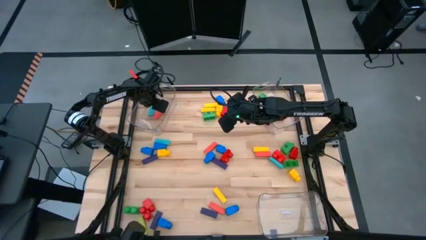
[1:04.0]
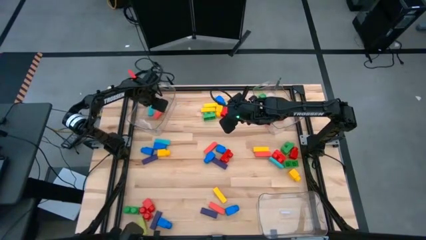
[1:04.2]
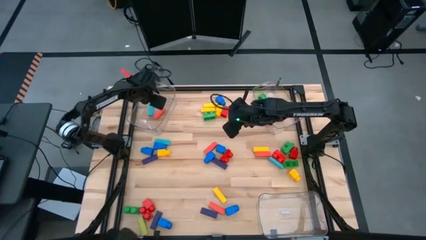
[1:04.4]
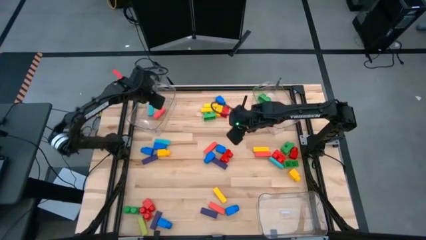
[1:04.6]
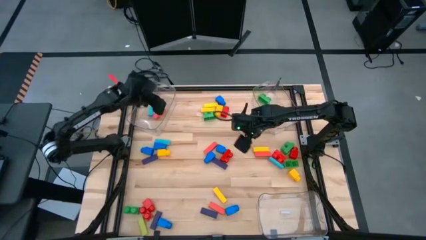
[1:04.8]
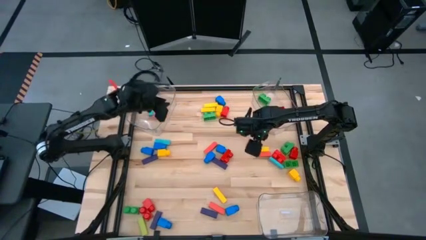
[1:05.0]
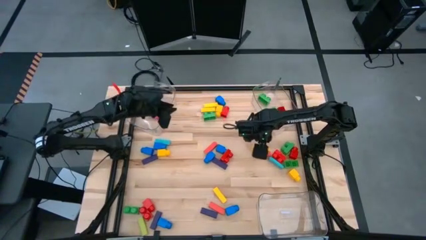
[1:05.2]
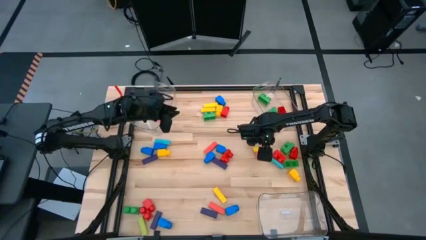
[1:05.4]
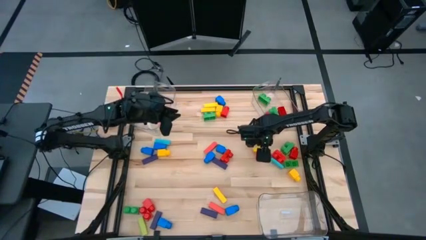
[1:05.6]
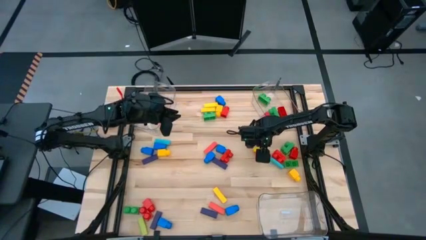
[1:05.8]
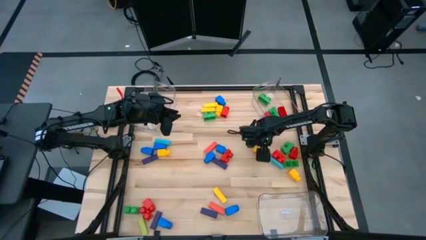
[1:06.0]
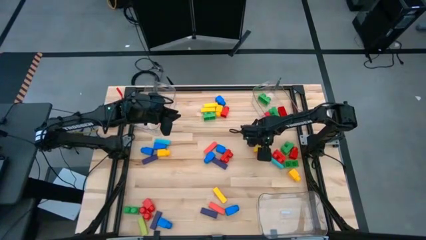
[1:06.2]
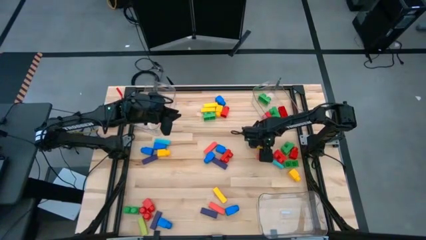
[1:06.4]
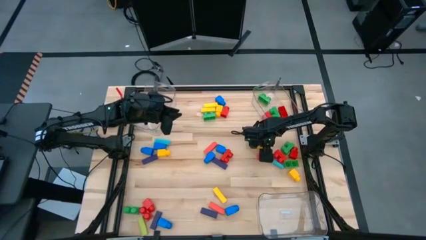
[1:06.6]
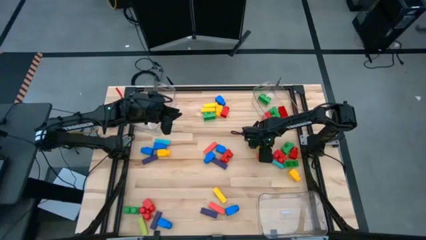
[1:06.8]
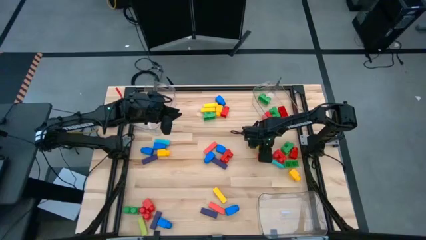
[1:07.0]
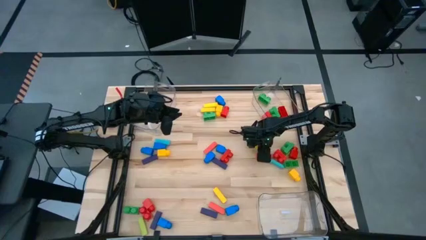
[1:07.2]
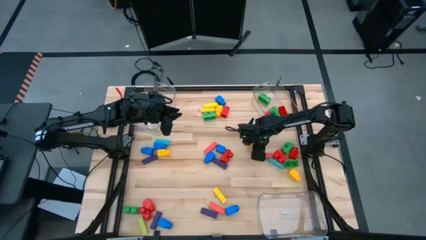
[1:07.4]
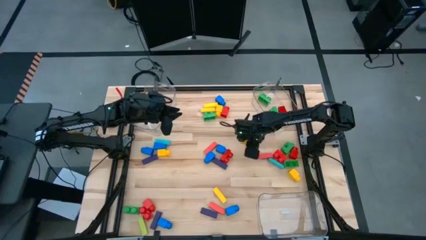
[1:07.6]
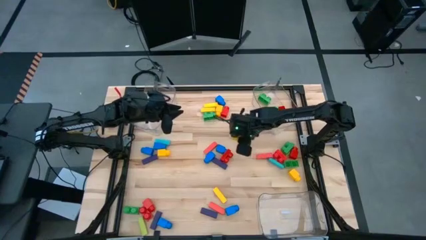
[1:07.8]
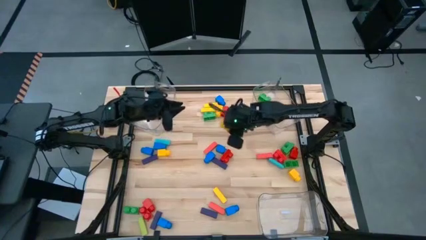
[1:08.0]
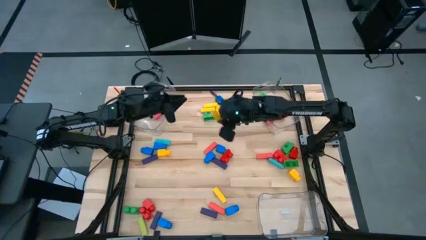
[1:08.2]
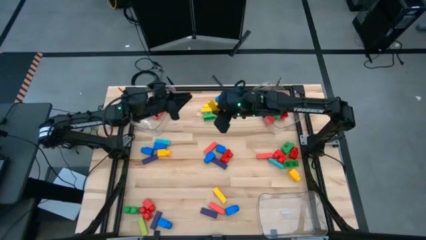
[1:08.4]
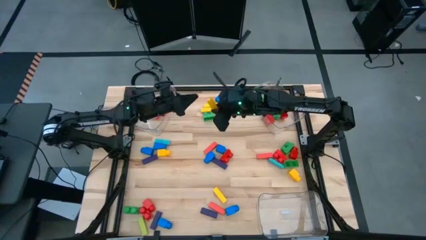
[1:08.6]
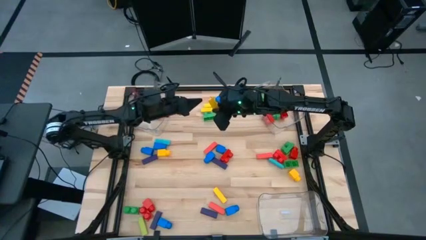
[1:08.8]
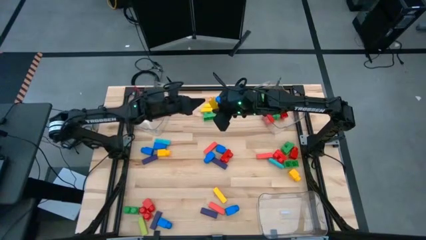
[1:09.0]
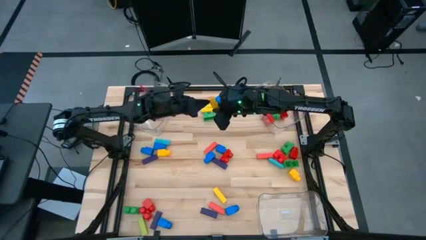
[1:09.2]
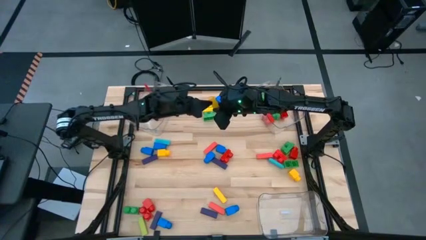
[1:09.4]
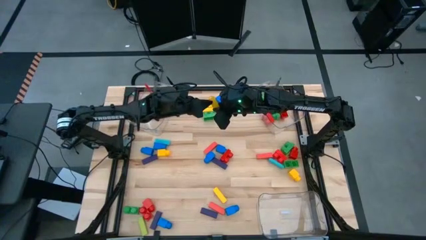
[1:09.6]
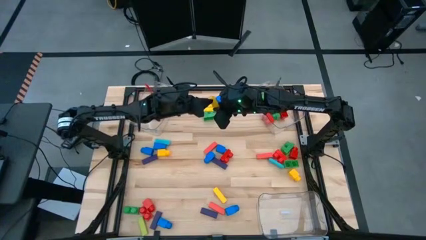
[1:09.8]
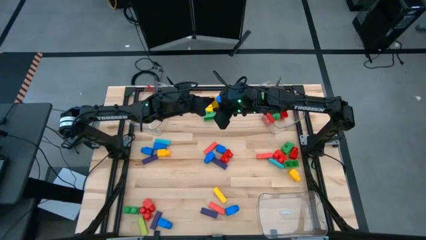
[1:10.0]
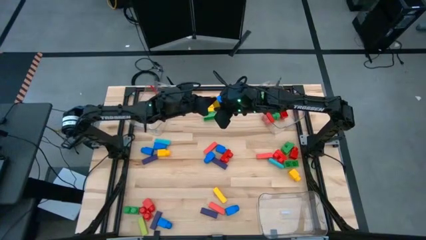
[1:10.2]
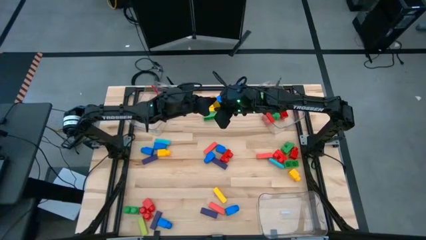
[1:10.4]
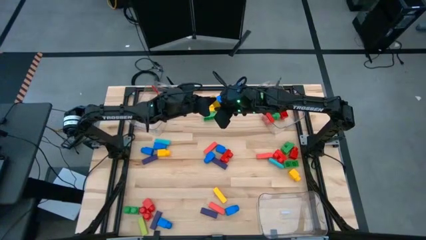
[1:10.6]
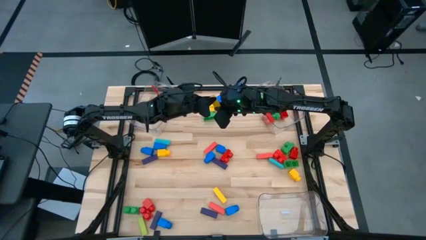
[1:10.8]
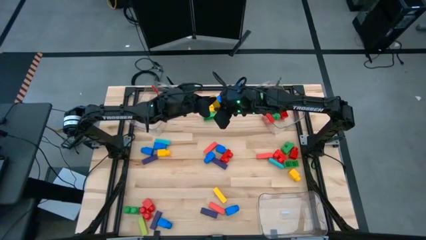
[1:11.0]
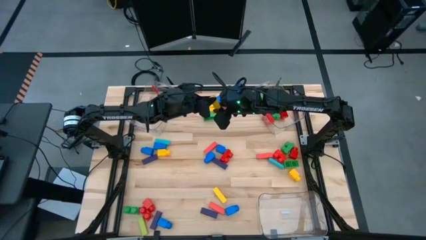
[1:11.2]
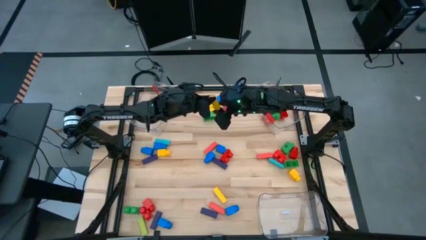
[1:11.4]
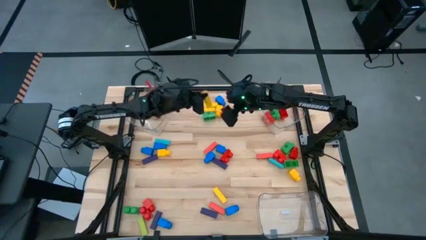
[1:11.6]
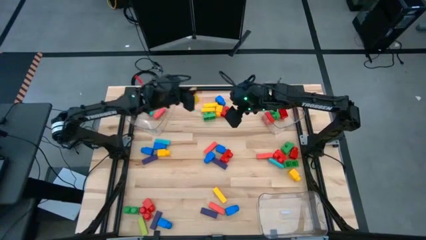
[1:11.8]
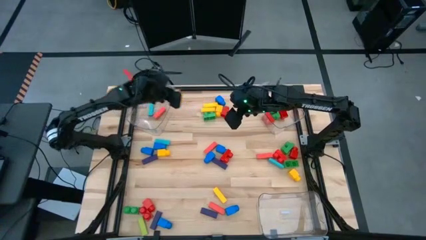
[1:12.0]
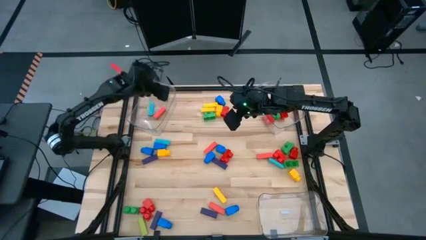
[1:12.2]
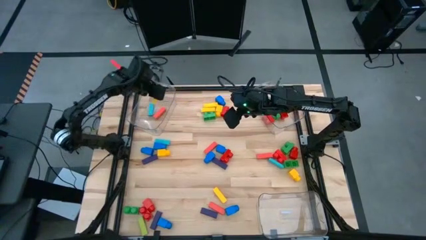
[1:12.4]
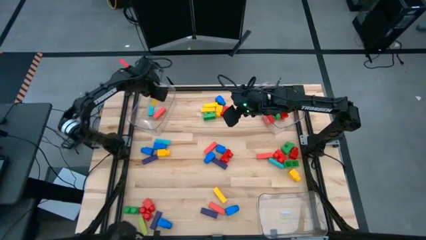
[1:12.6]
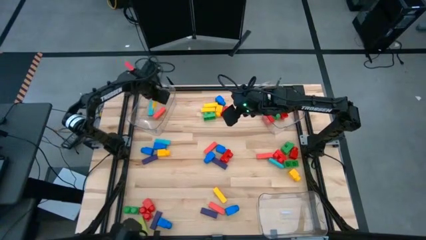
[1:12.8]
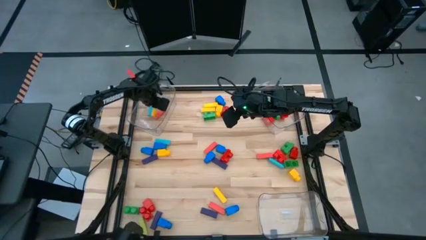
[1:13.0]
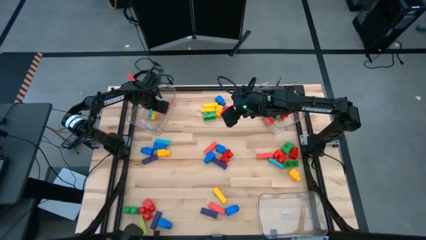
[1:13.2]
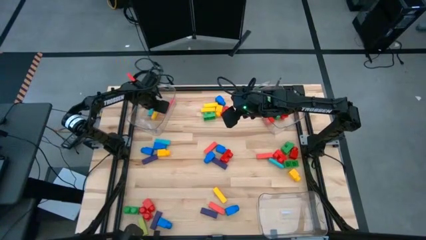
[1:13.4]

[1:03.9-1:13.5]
Task: Sort blocks by size
Put the yellow block into the top left transparent bin

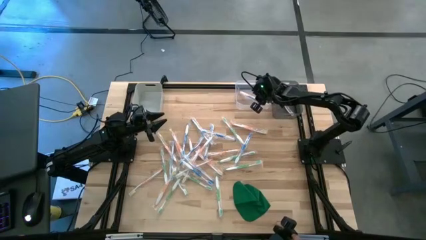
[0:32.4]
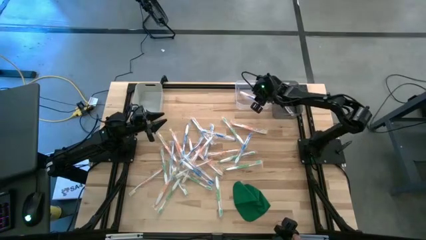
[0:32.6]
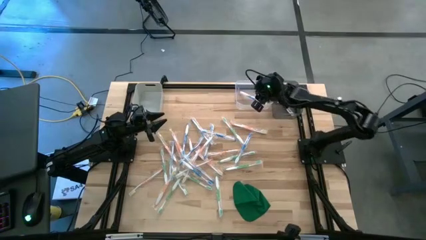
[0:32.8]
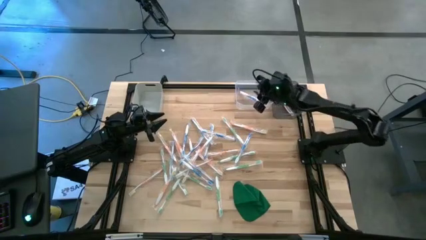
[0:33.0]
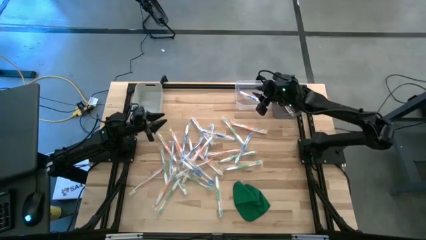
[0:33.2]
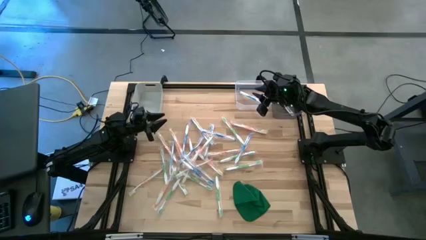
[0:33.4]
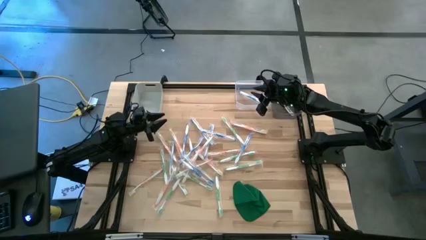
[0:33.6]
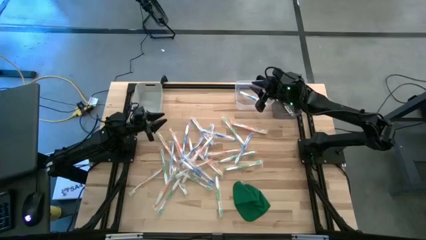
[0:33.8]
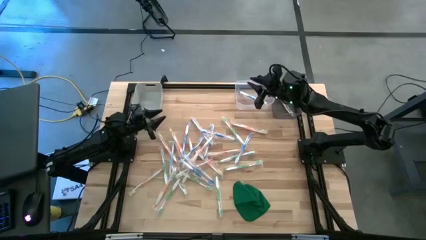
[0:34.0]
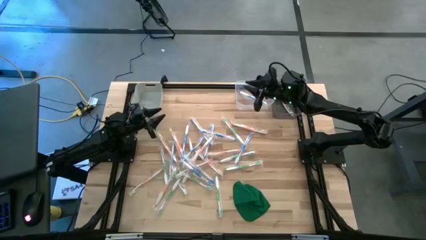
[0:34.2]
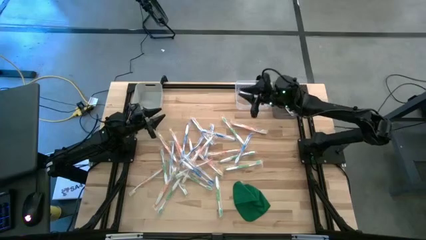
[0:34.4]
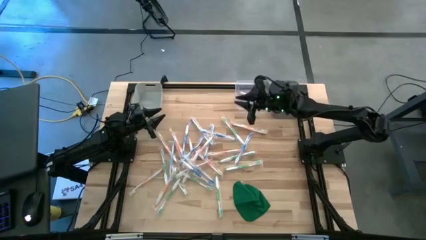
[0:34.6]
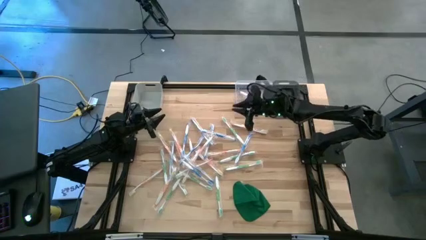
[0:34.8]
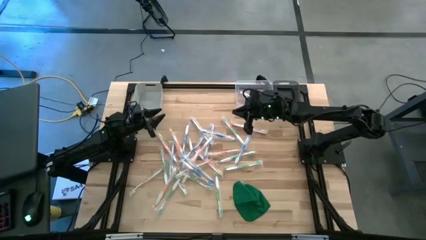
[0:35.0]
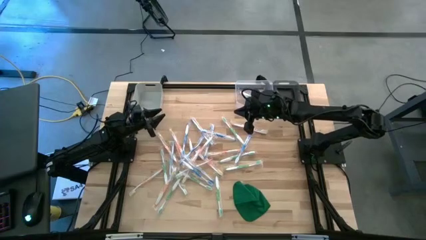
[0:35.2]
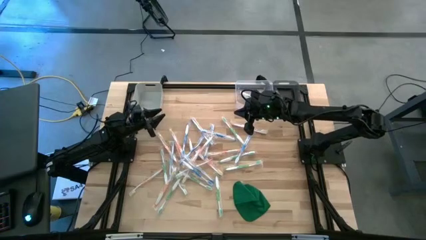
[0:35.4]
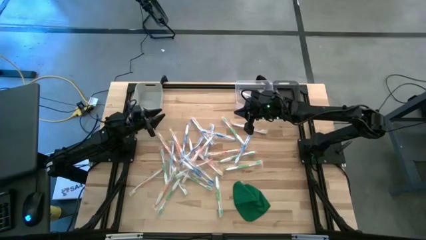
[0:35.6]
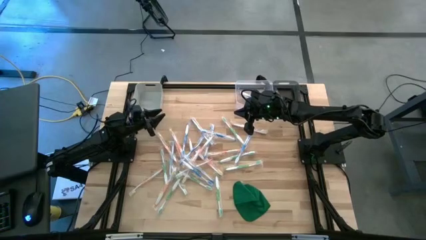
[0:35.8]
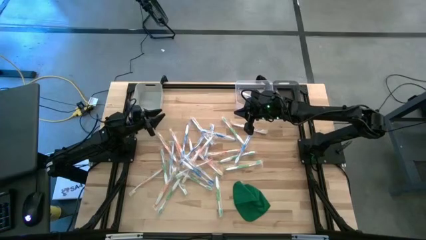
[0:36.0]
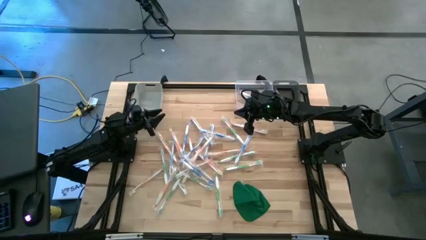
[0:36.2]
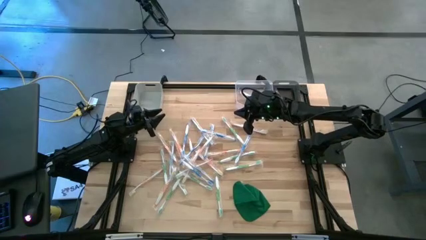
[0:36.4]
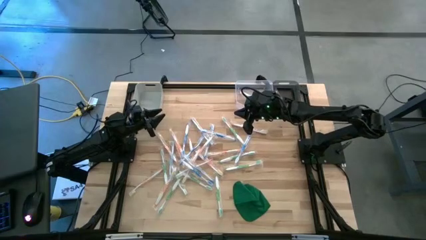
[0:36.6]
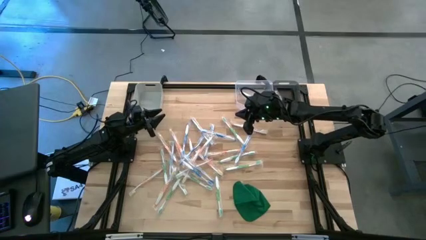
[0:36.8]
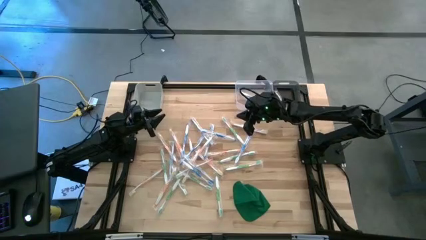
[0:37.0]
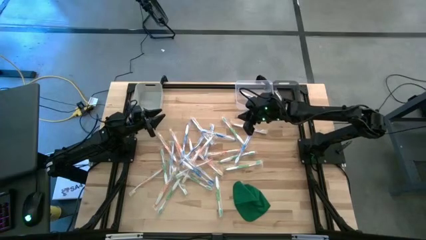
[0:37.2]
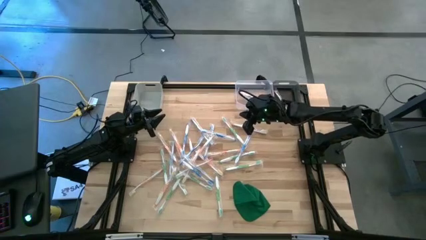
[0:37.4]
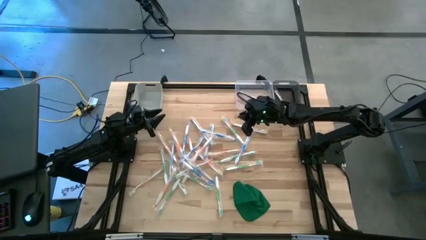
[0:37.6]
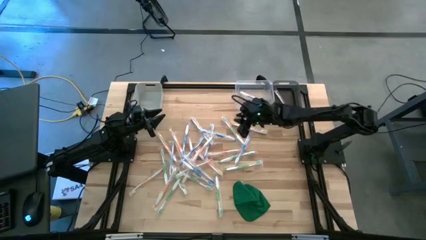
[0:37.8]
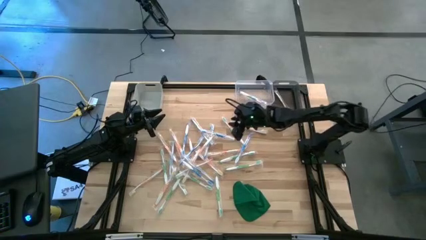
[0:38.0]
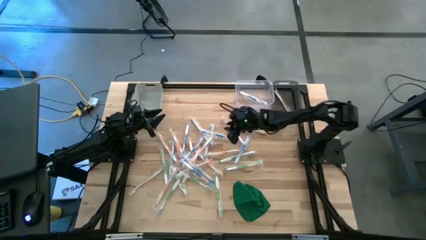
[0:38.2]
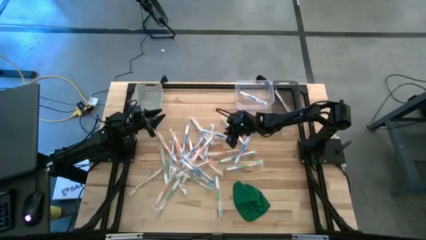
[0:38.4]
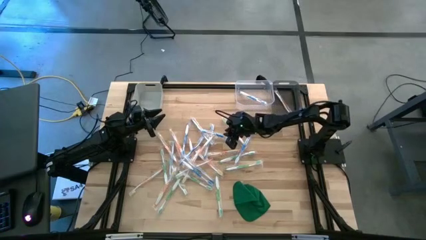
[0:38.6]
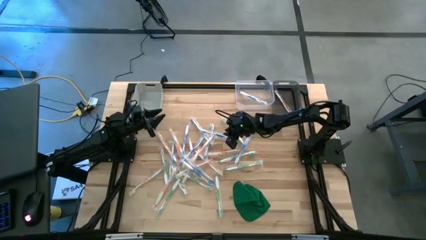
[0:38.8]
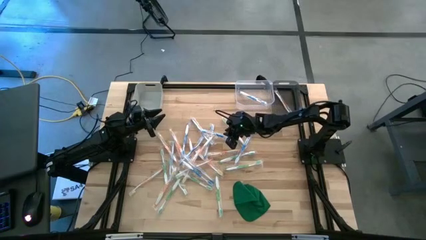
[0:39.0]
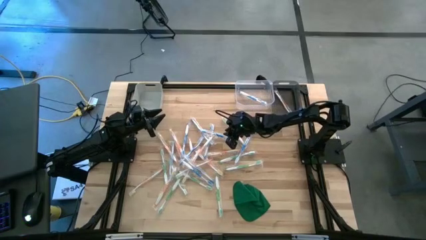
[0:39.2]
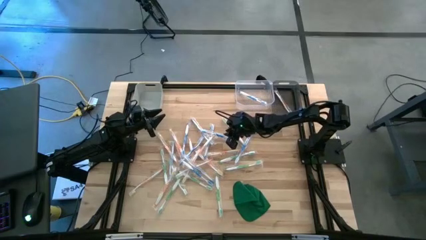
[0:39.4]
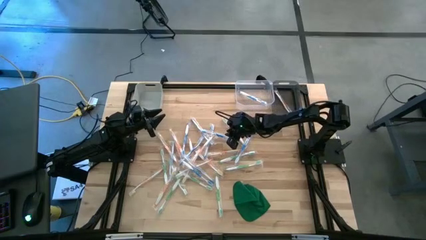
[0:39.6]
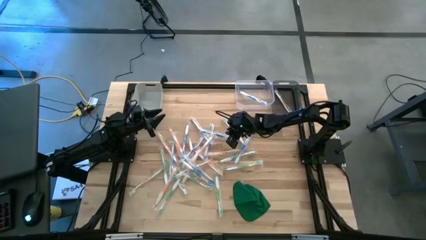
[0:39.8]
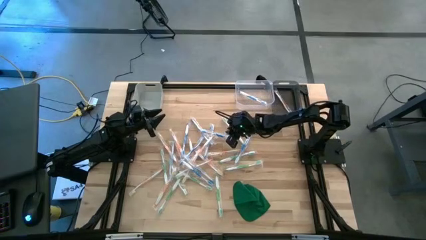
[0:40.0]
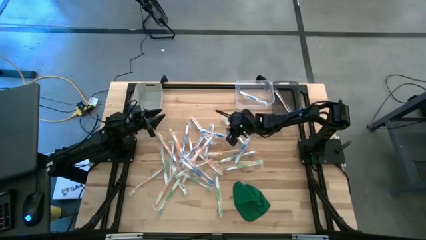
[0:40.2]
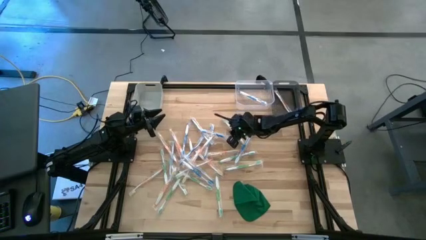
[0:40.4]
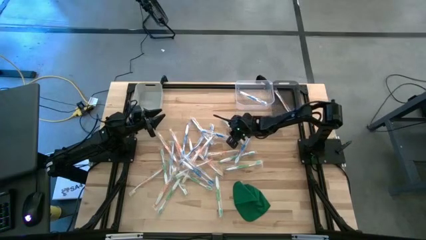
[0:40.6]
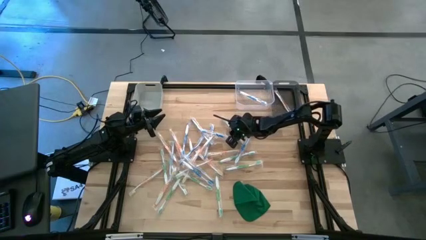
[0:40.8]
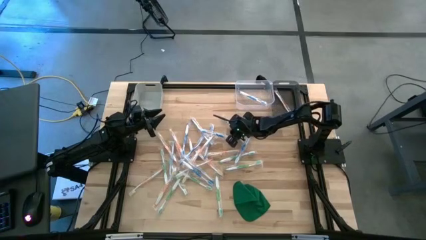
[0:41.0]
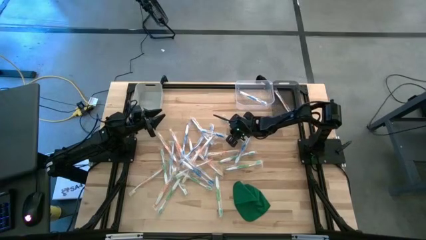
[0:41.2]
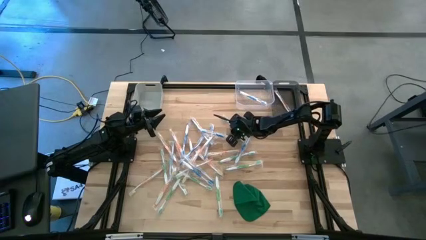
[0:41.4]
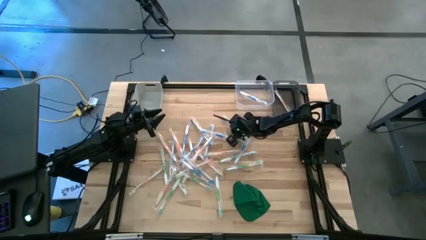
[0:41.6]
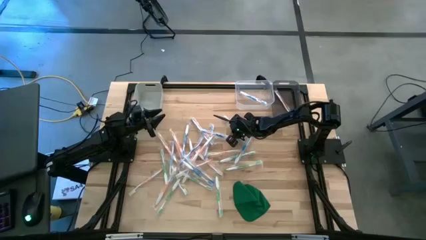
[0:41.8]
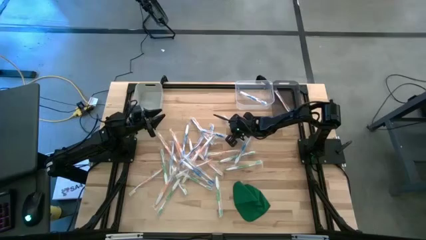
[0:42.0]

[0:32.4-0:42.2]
Task: Pick & Place Toothbrushes
Put the green toothbrush into the gray bin
